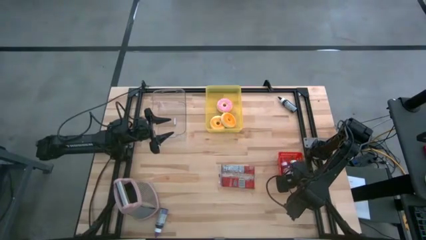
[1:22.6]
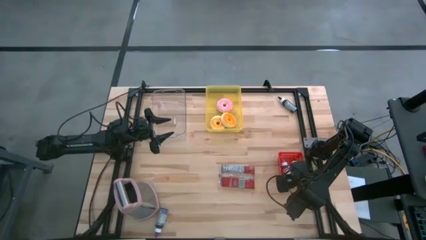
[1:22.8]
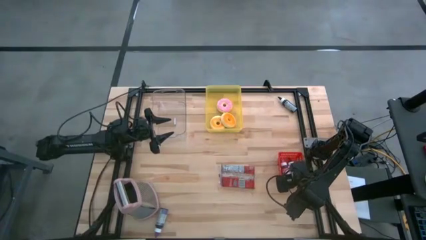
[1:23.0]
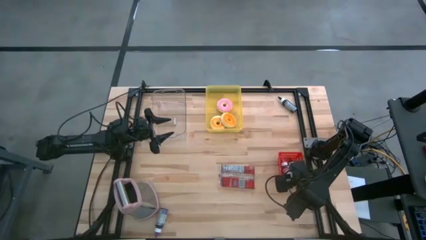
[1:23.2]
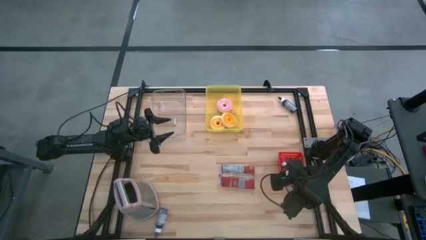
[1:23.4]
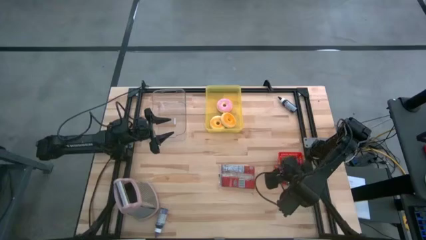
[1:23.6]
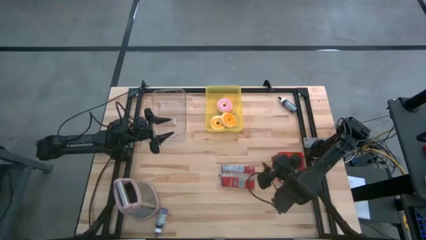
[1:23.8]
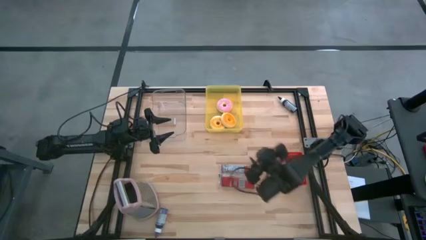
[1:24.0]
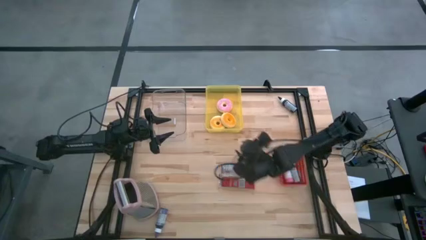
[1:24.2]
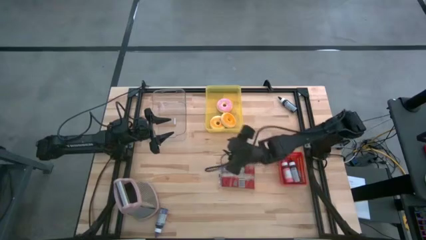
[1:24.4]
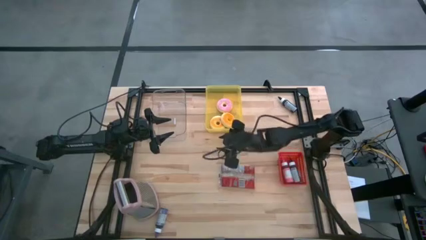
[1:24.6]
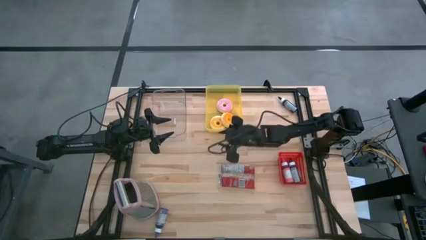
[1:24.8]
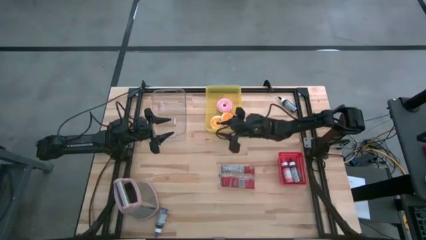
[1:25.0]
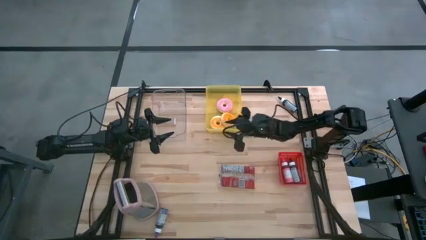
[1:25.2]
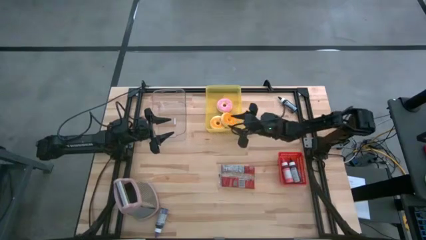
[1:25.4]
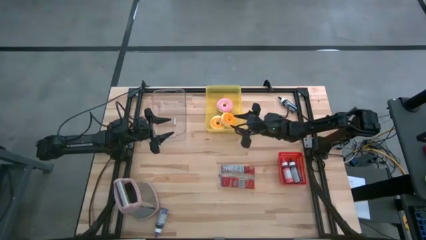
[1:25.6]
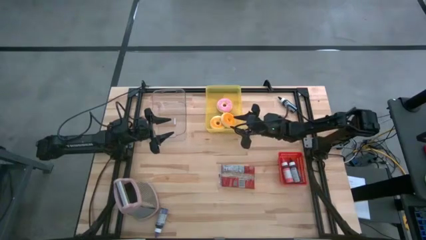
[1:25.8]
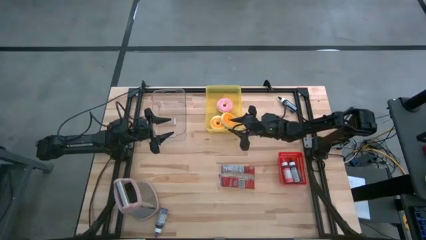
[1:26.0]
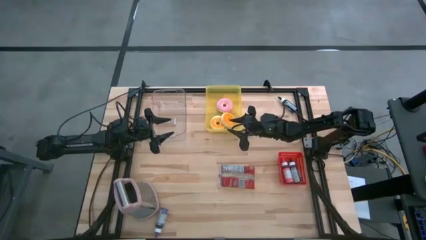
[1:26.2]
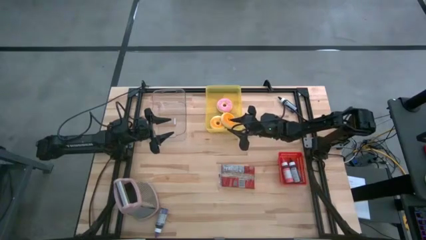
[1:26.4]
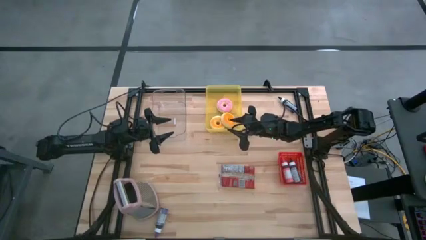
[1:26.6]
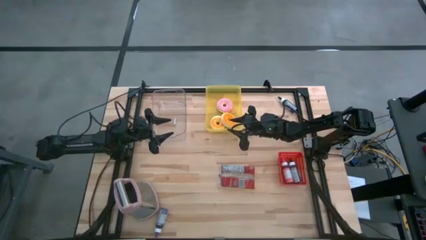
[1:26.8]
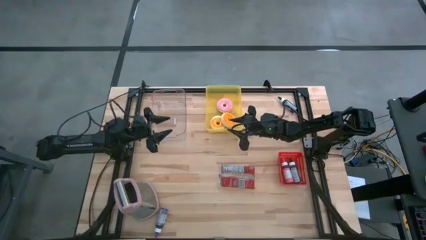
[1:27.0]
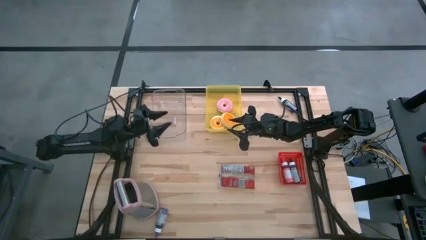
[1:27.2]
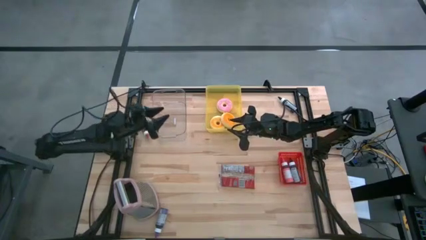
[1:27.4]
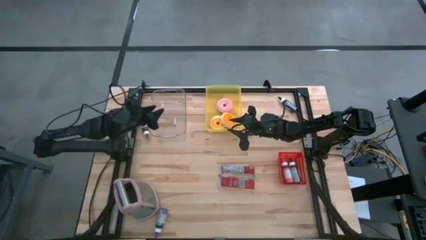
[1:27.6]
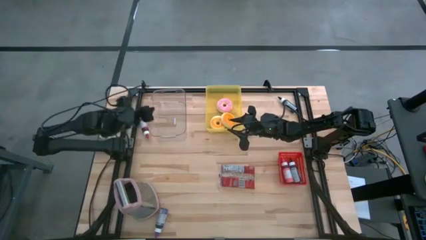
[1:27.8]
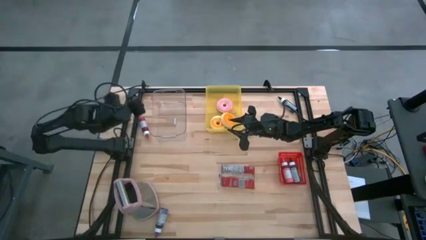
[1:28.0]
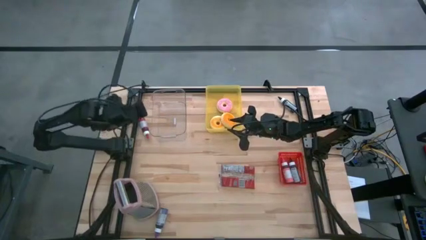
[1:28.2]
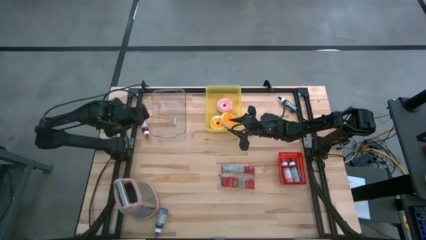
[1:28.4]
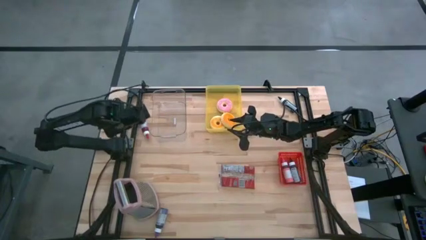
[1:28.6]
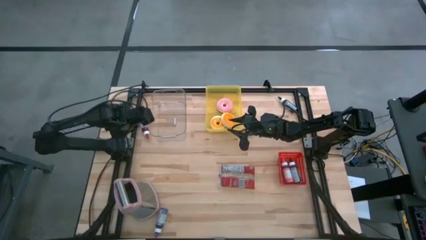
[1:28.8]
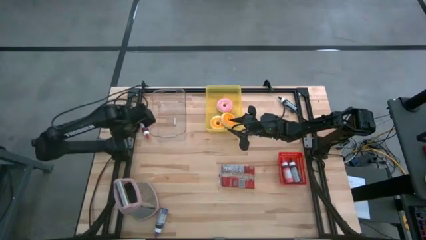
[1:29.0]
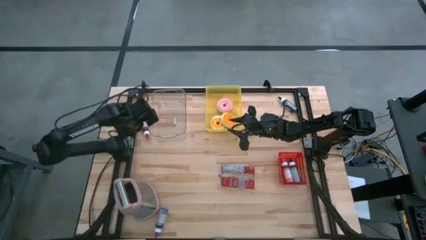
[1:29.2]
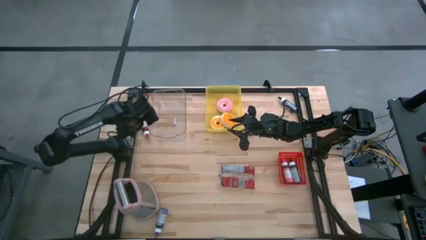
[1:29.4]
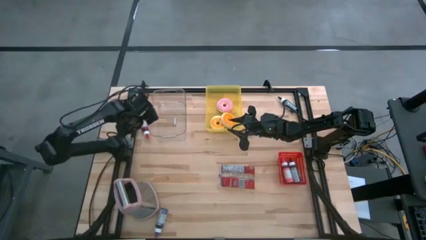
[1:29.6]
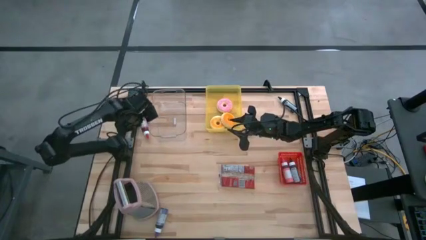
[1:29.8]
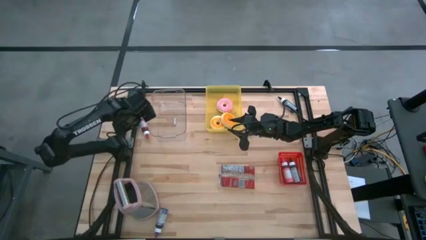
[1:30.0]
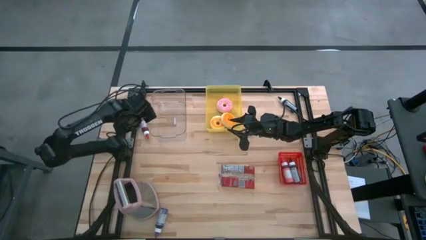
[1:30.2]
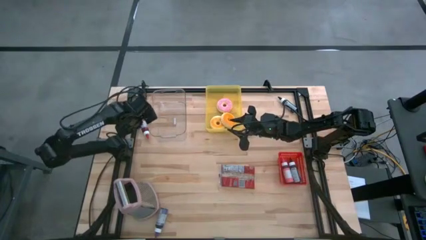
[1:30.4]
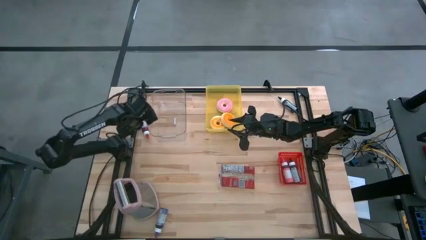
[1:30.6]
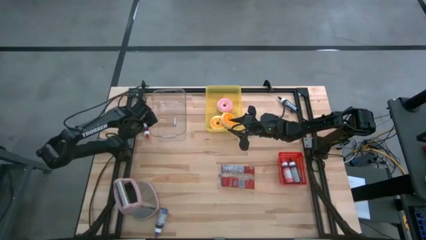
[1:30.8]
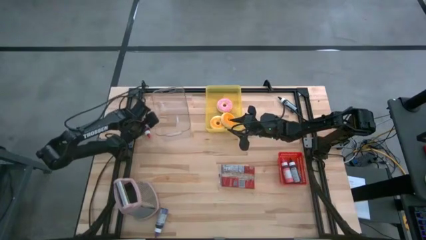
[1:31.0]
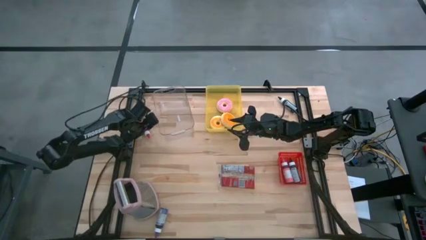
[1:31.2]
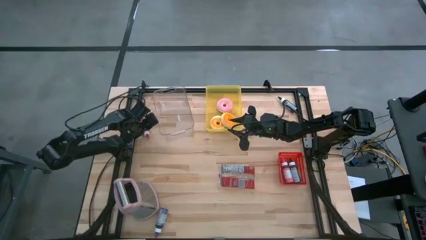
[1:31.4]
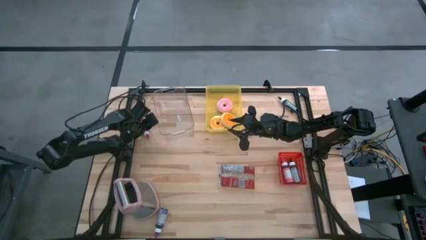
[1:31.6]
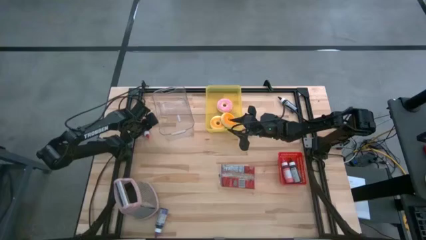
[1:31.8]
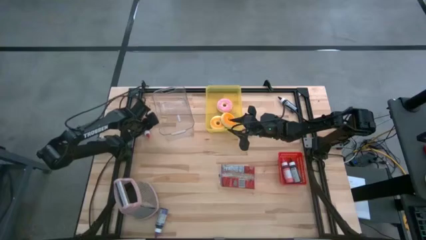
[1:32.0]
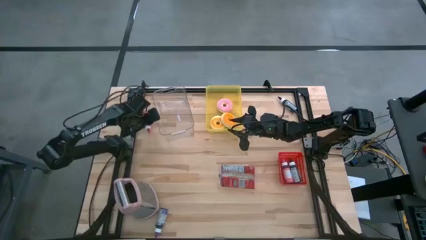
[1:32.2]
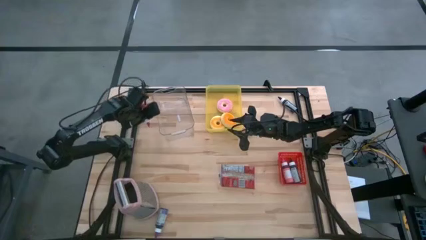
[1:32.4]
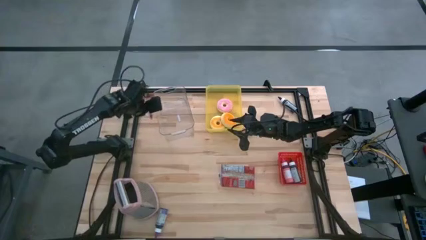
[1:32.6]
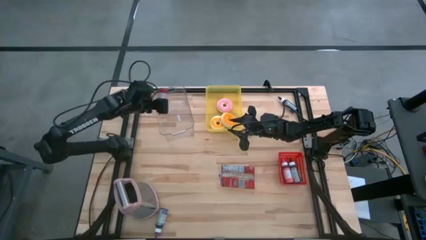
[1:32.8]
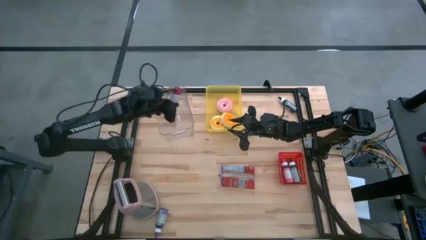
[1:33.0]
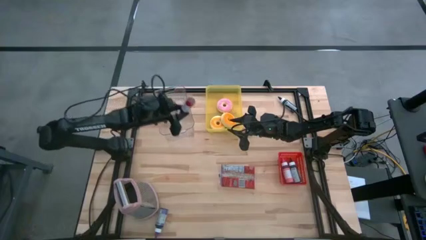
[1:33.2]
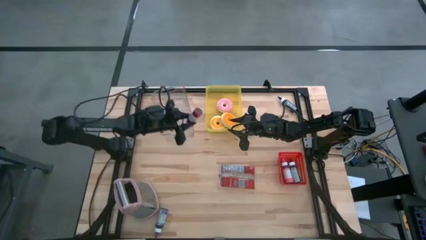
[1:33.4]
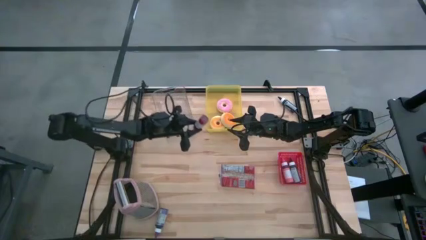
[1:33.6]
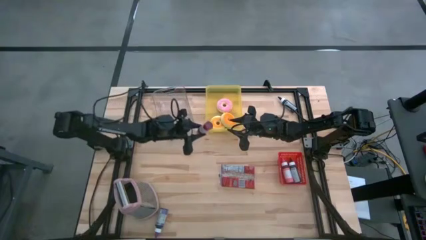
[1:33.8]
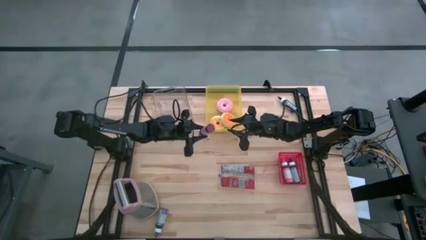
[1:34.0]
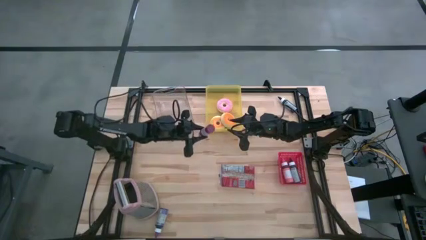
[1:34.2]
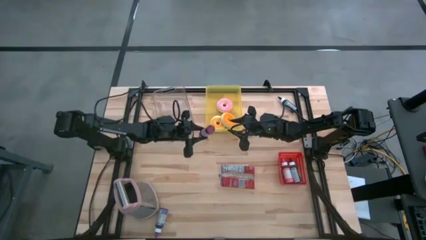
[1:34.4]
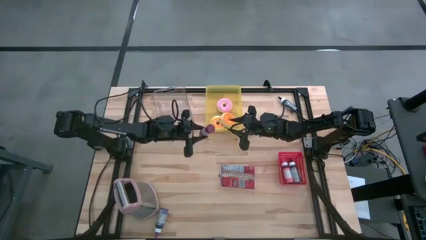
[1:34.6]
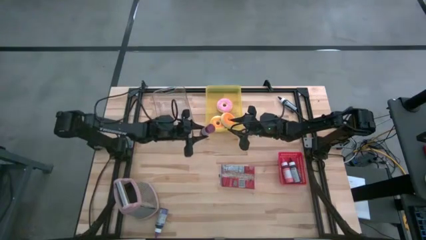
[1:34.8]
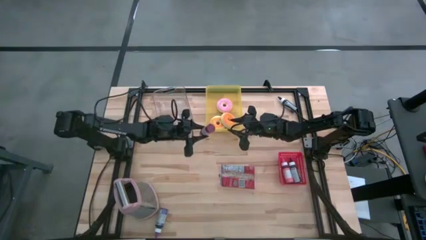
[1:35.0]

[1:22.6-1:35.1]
Task: Pick & Place Food Item
Put the red food coloring bottle into the red bin
